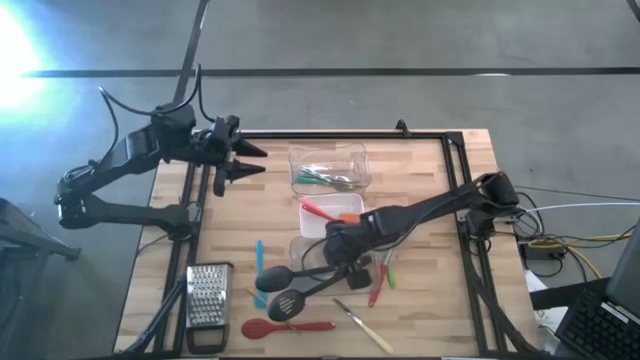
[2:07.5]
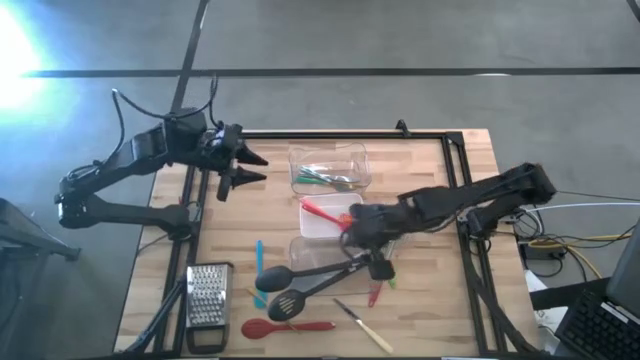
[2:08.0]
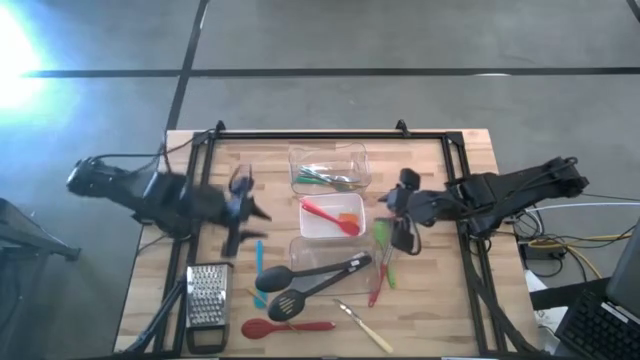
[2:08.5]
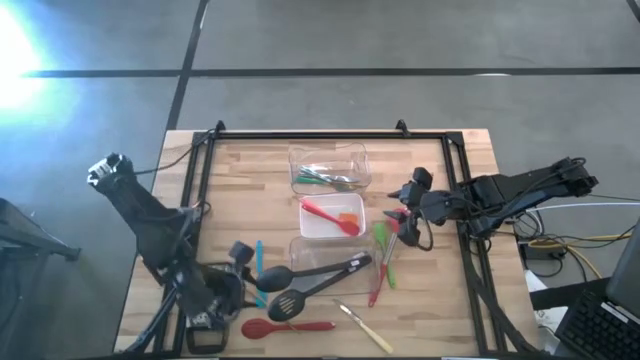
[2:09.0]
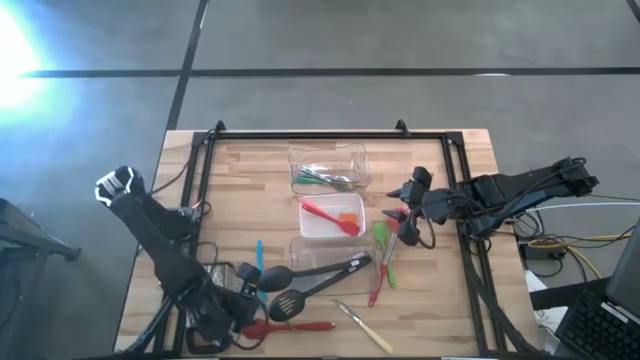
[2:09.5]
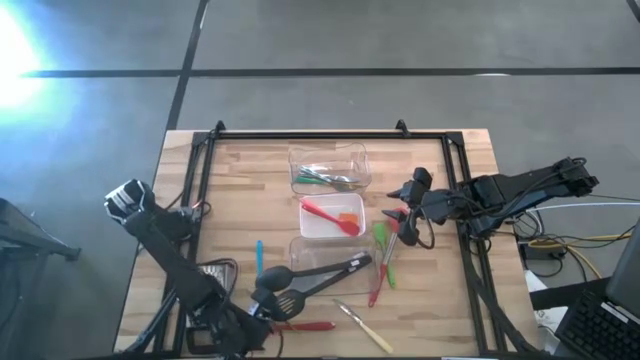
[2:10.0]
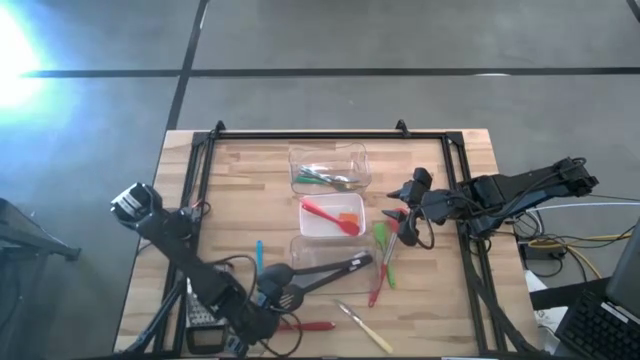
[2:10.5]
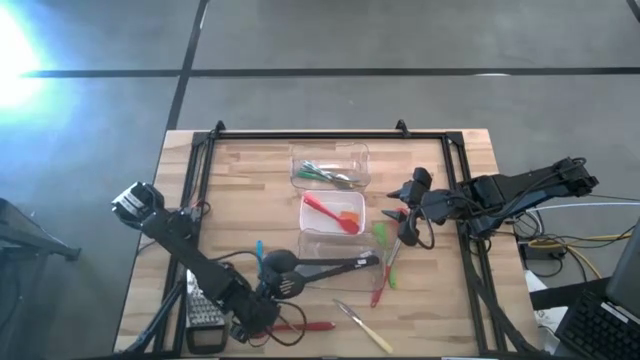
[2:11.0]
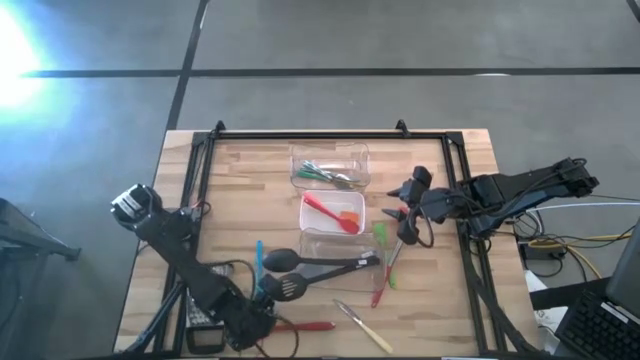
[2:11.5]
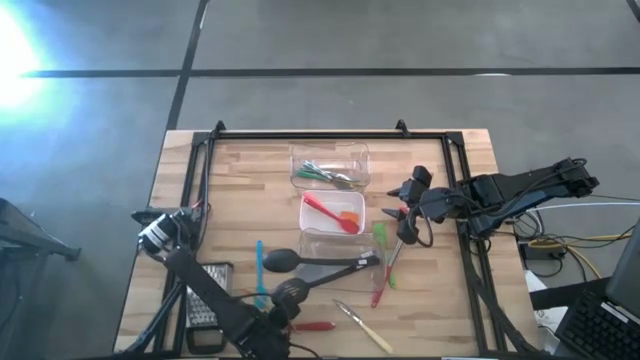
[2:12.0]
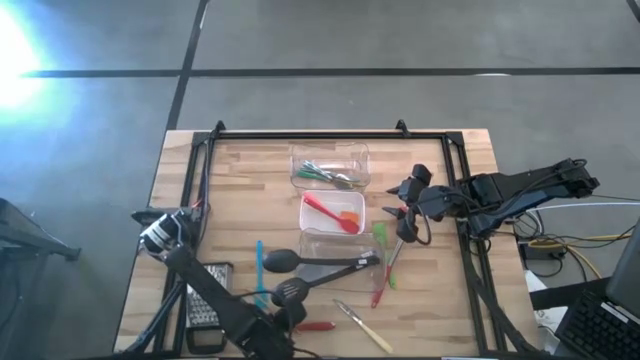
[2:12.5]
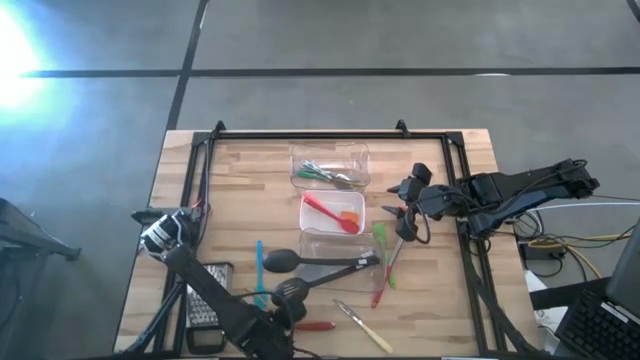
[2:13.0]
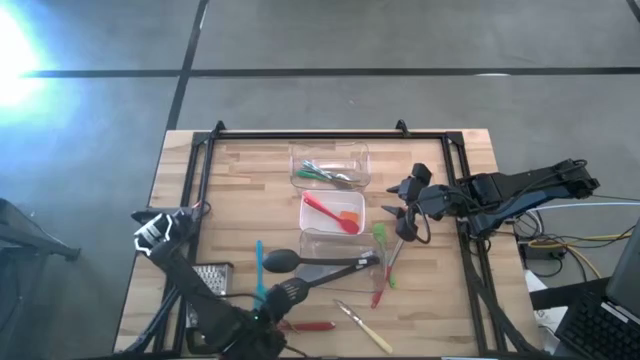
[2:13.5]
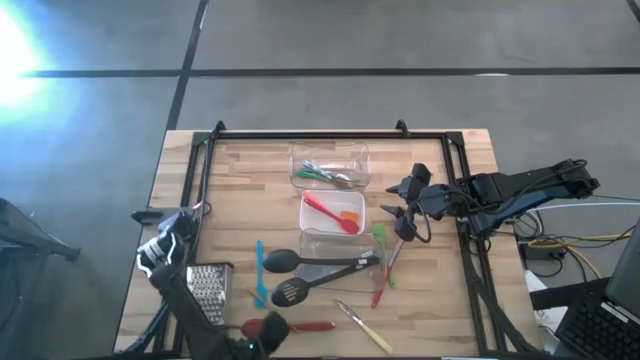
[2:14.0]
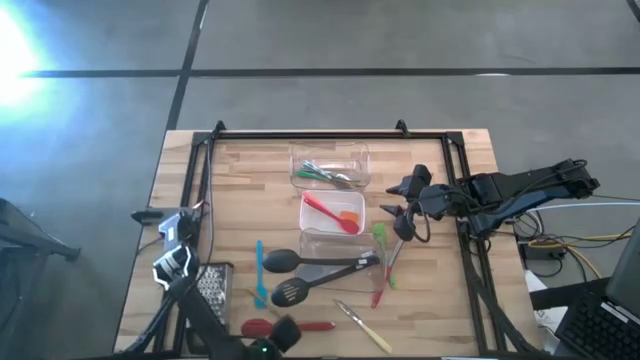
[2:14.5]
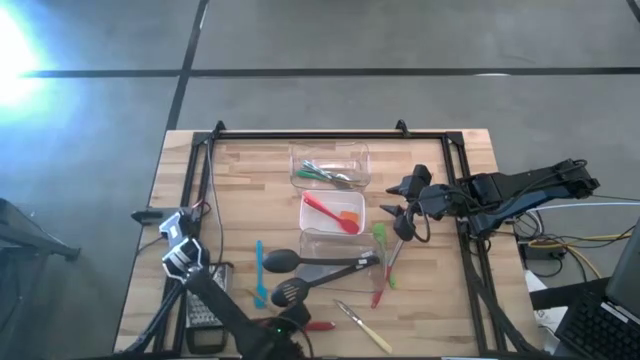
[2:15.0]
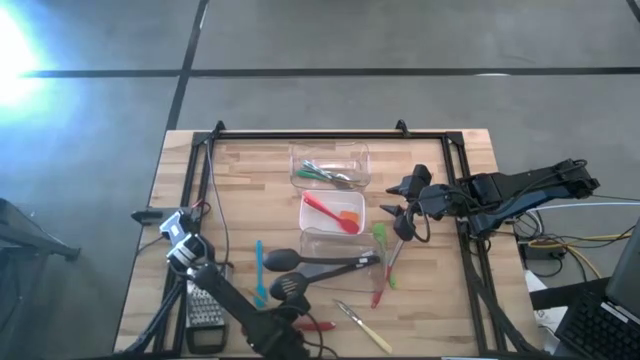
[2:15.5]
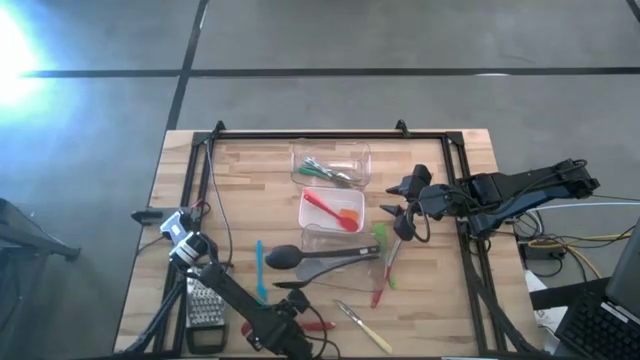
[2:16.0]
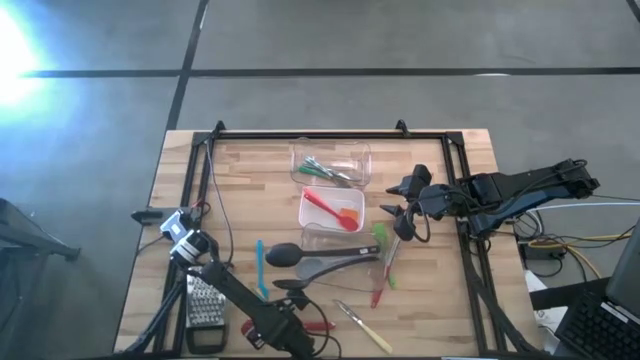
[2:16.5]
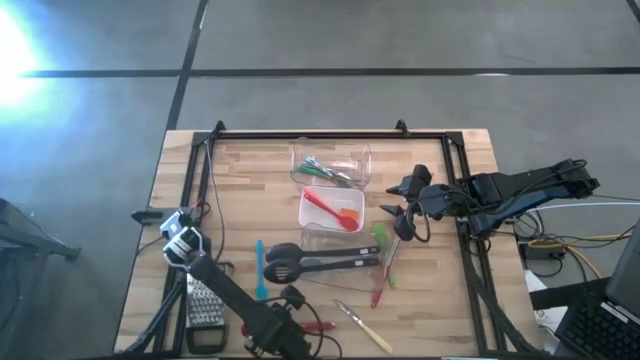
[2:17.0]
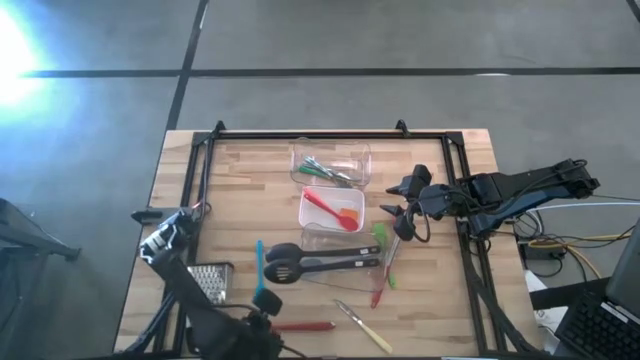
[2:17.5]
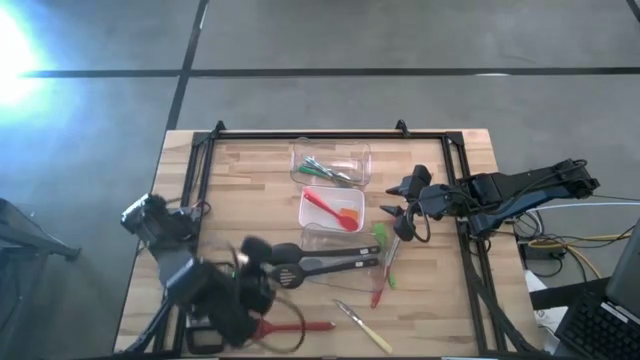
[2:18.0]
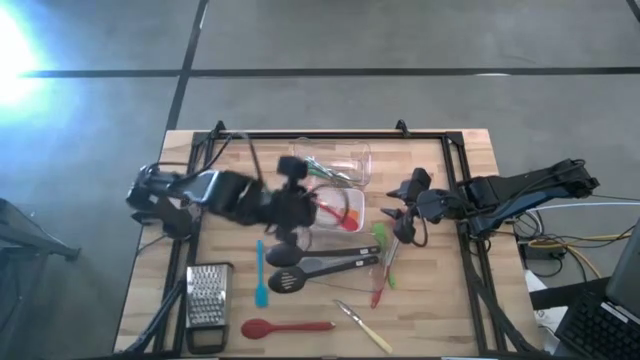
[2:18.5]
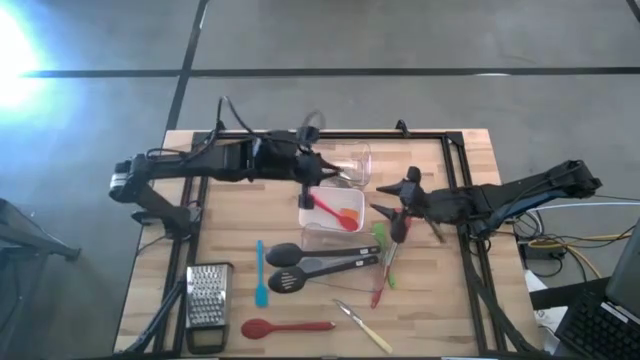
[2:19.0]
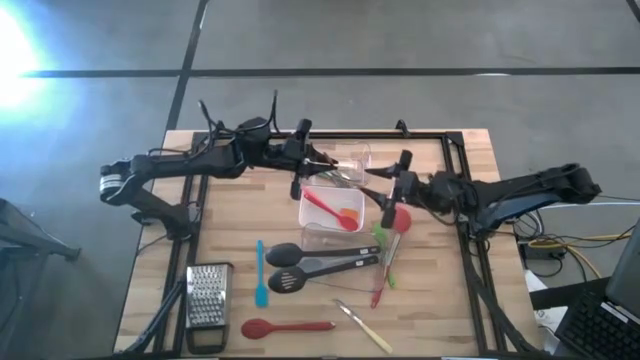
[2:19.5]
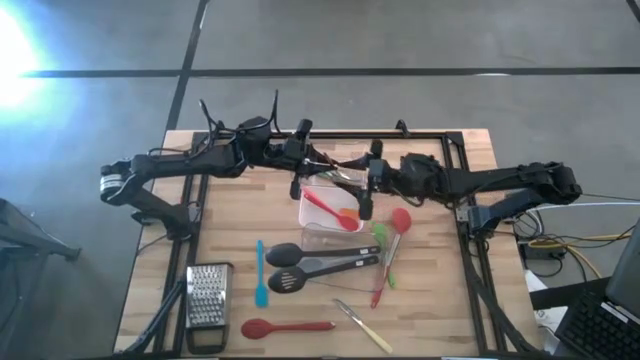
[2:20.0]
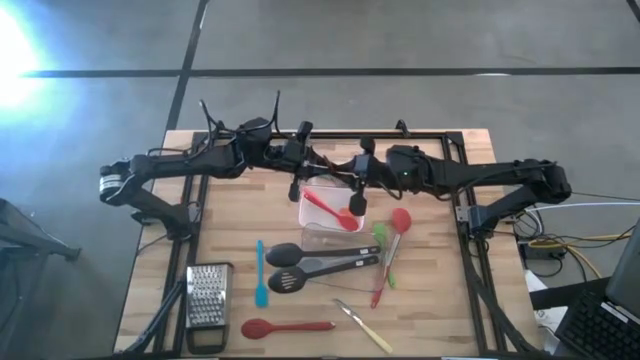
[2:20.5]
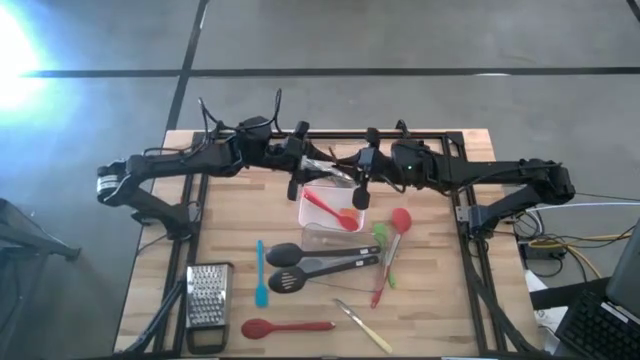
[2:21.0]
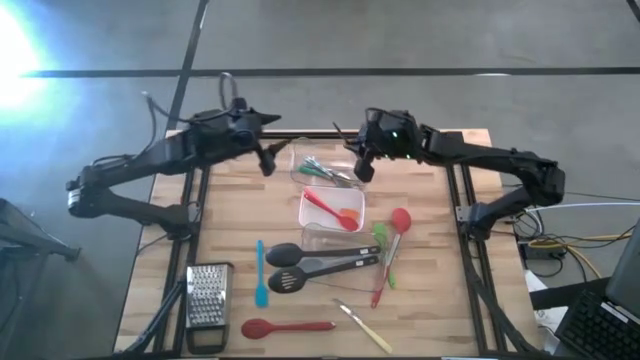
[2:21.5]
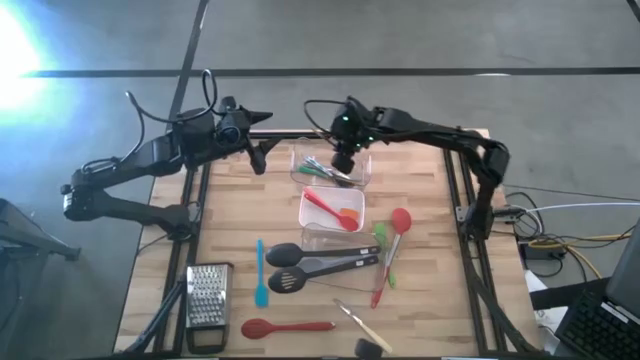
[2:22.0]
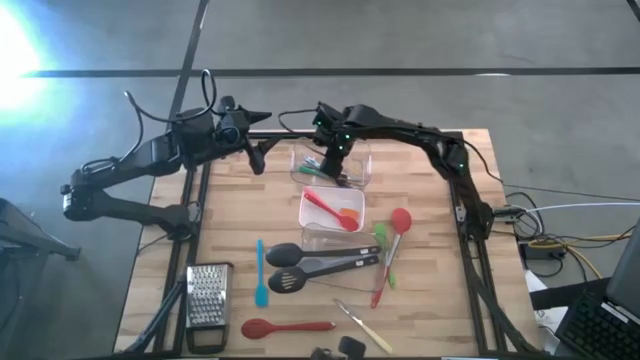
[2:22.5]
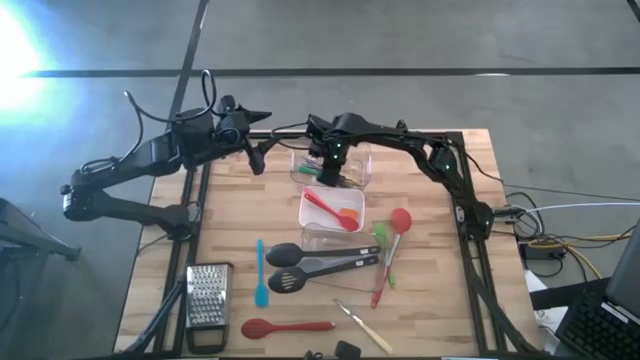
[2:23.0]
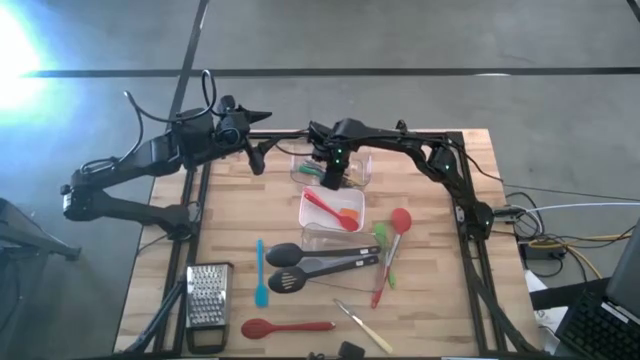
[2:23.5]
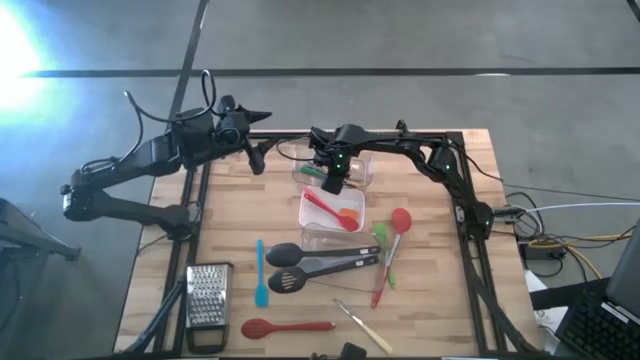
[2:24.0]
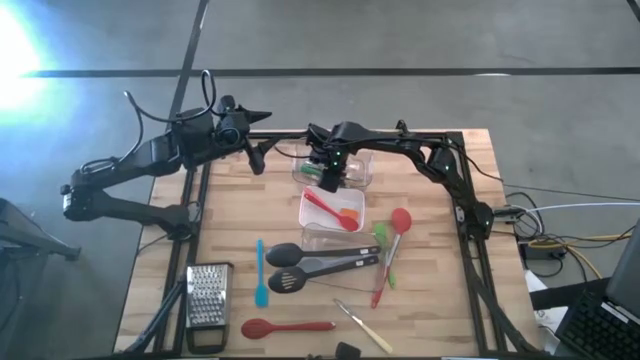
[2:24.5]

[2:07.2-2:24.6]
Task: Pick & Place Kitchen Items
Put the golden knife into the top transparent bin

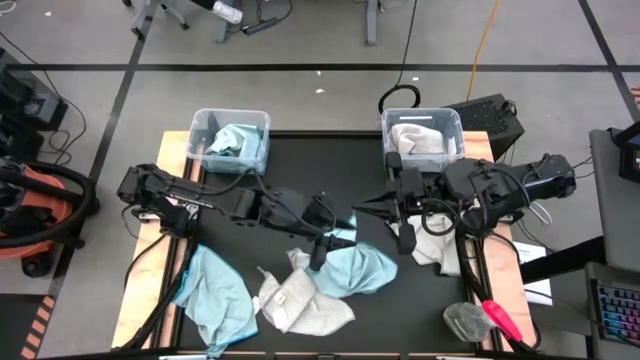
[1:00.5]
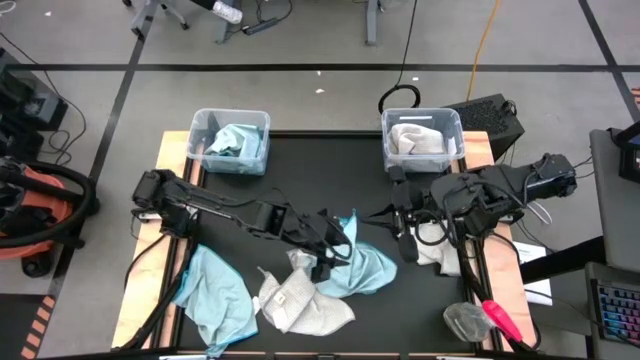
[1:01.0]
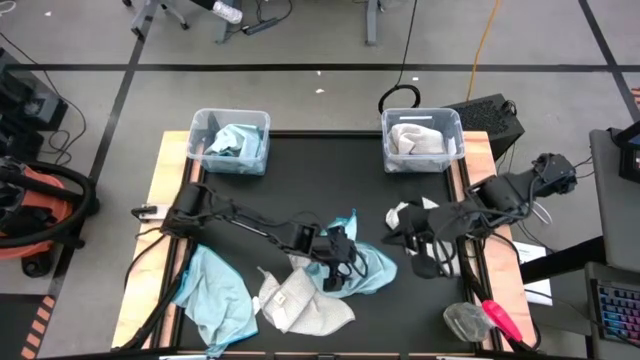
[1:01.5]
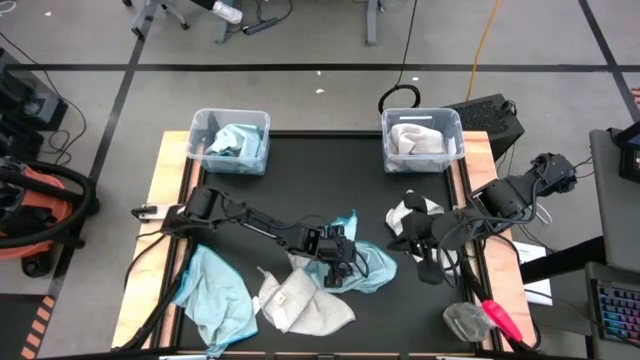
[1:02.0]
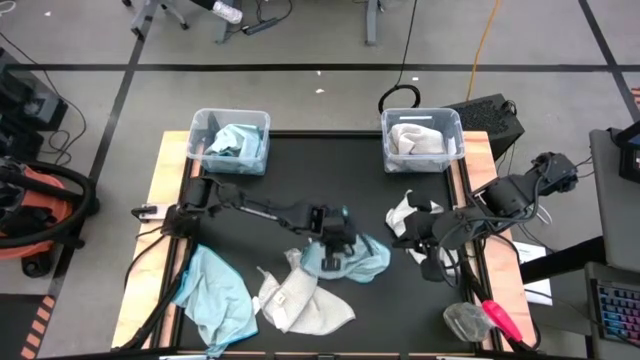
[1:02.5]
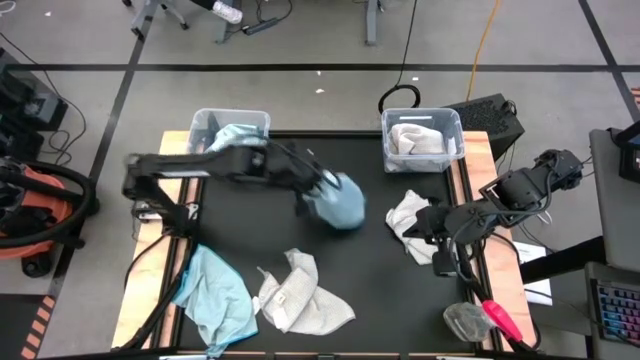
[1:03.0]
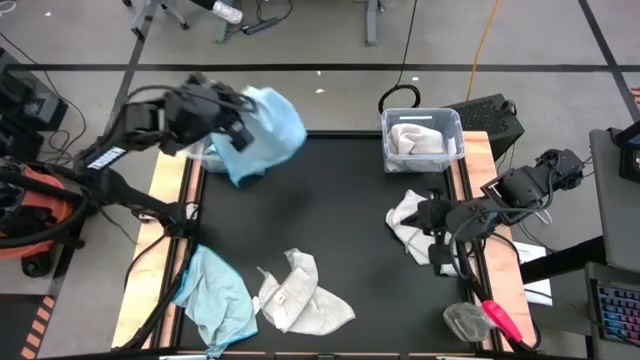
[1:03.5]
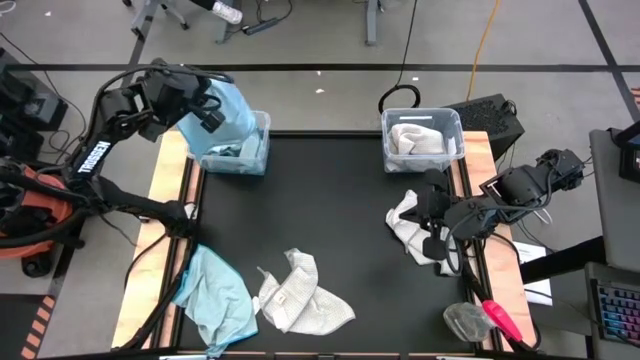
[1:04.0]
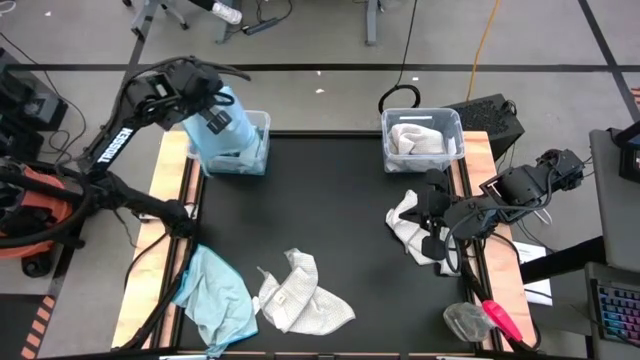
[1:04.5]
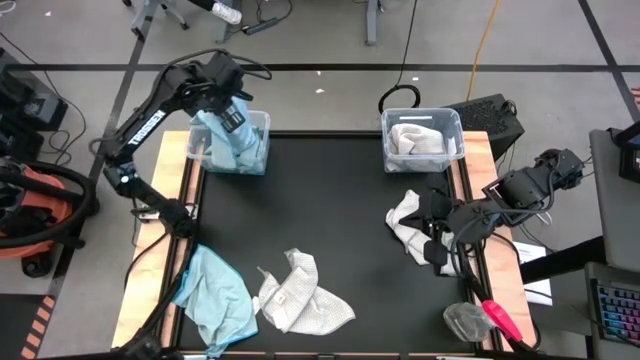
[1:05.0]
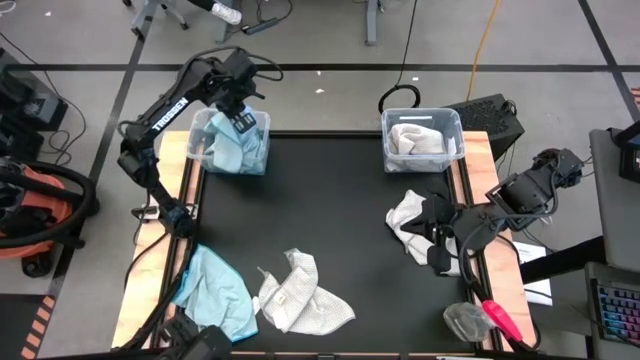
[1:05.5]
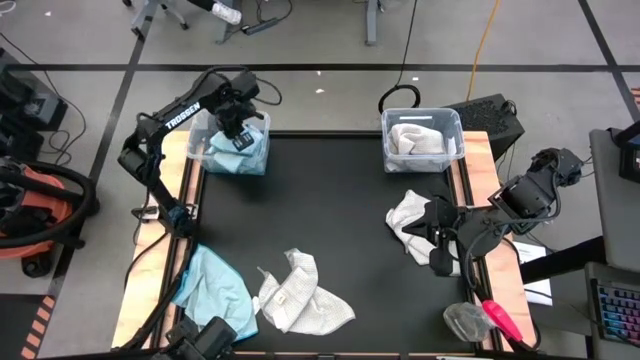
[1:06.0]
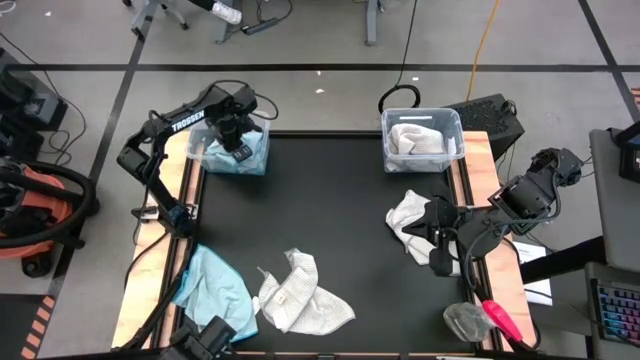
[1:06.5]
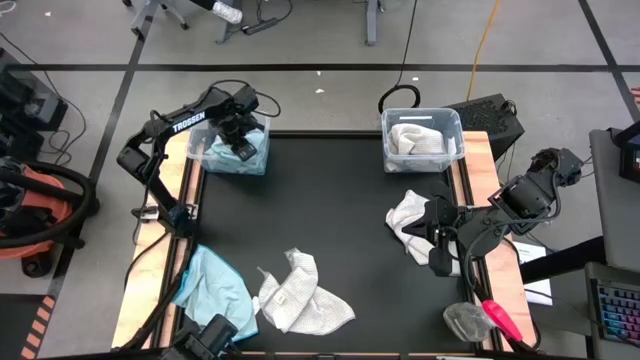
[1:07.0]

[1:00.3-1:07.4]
Task: Sort microfiber towel by color & place in baskets
Put the blue towel into the left transparent bin
